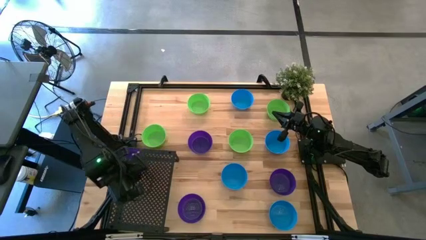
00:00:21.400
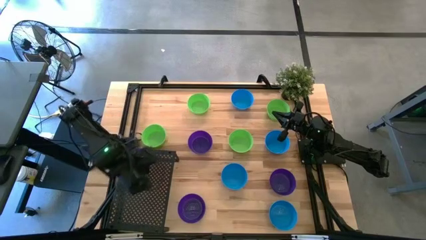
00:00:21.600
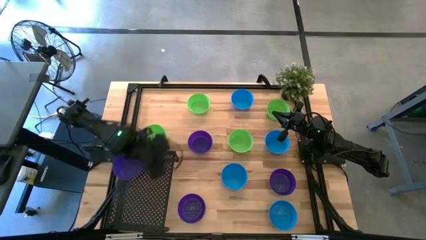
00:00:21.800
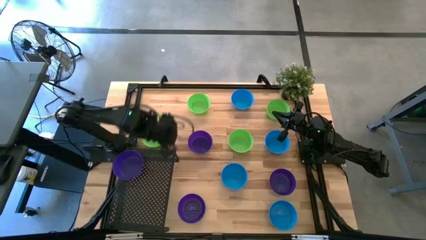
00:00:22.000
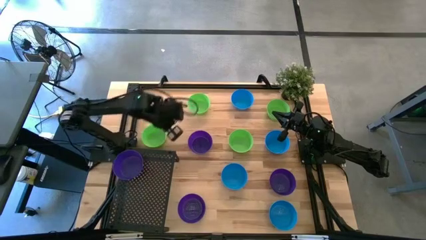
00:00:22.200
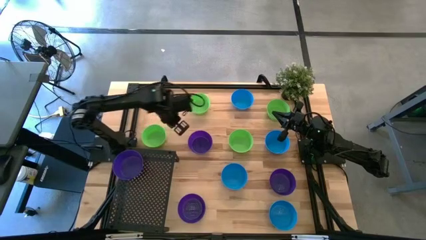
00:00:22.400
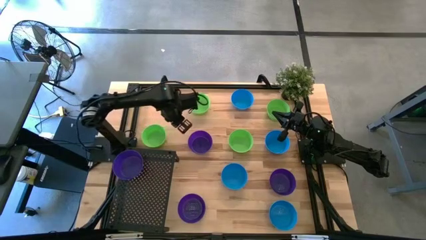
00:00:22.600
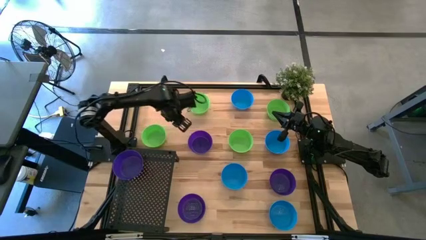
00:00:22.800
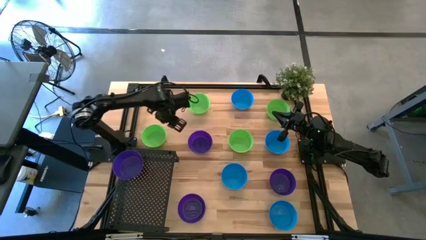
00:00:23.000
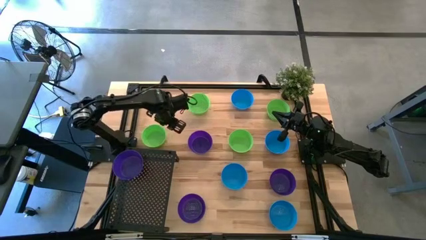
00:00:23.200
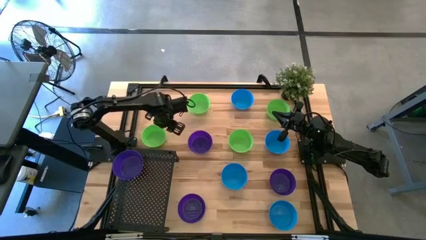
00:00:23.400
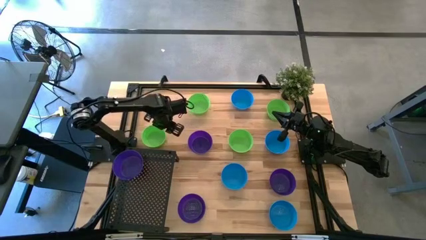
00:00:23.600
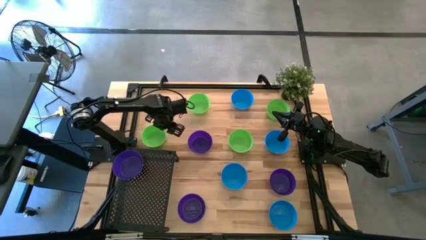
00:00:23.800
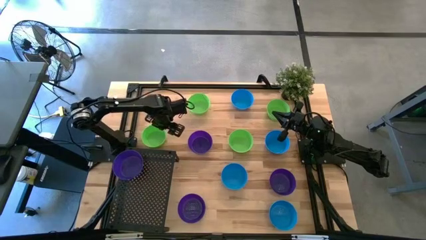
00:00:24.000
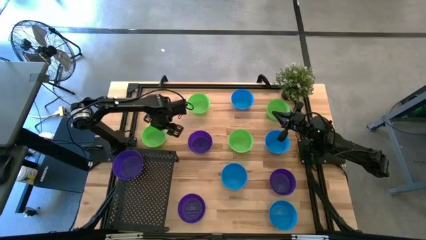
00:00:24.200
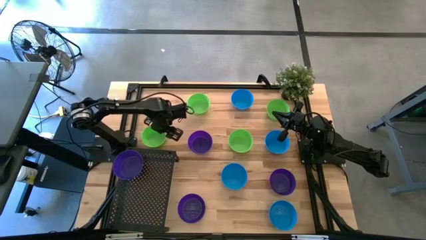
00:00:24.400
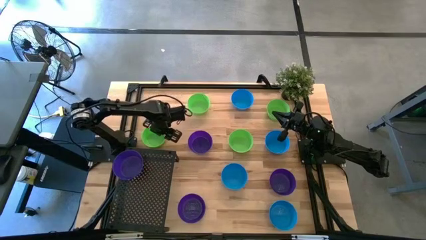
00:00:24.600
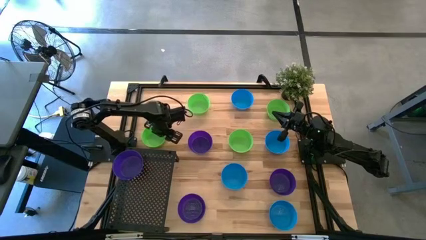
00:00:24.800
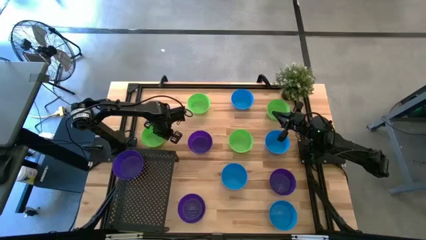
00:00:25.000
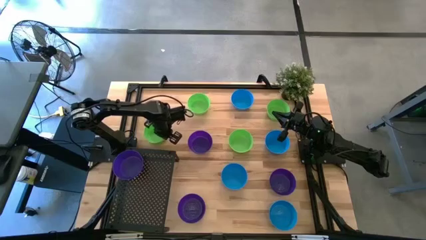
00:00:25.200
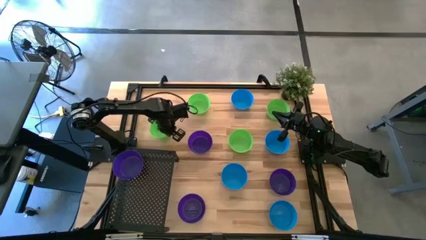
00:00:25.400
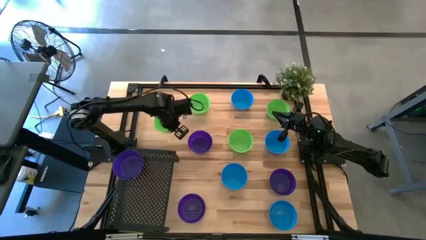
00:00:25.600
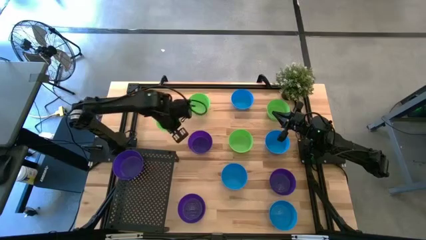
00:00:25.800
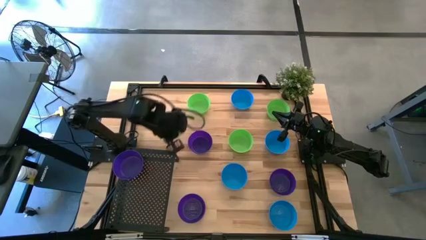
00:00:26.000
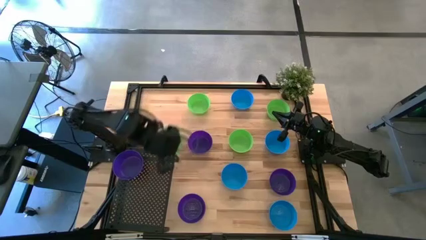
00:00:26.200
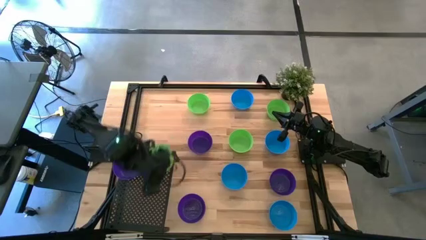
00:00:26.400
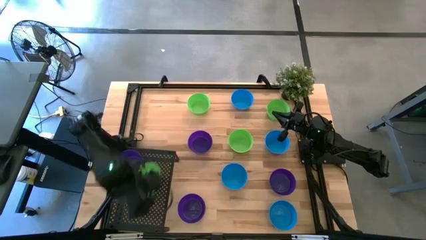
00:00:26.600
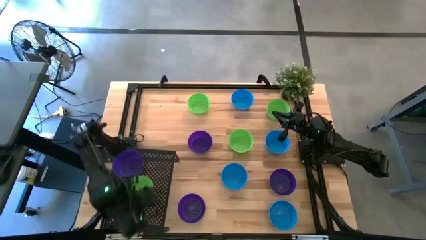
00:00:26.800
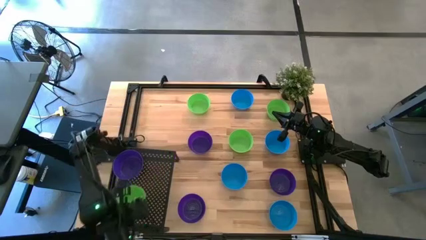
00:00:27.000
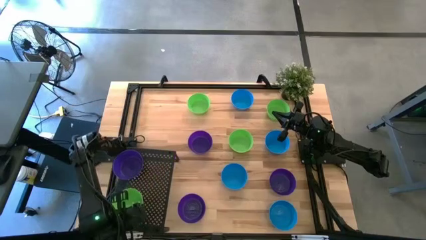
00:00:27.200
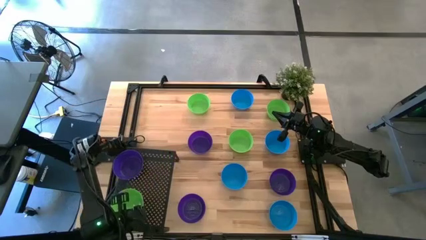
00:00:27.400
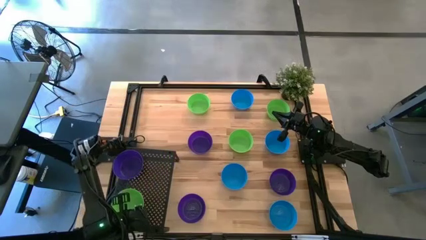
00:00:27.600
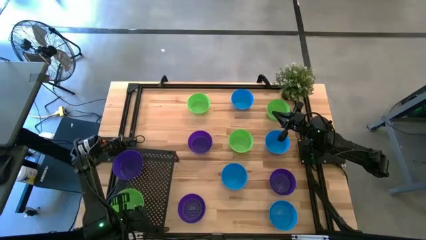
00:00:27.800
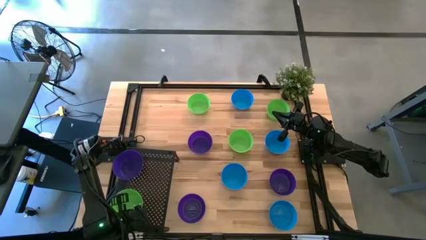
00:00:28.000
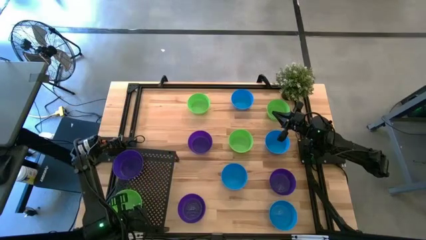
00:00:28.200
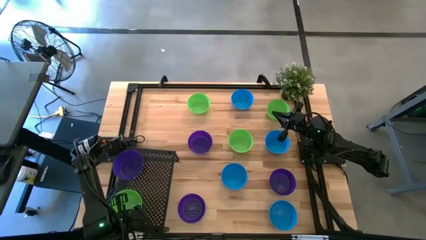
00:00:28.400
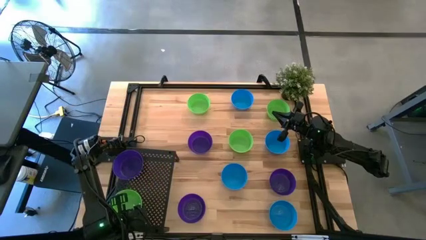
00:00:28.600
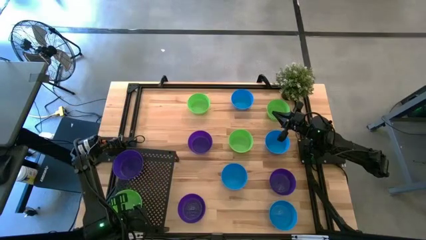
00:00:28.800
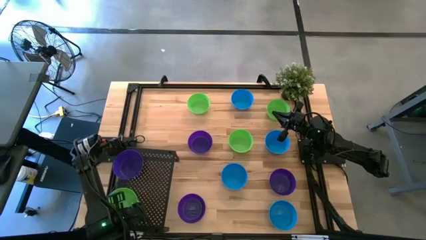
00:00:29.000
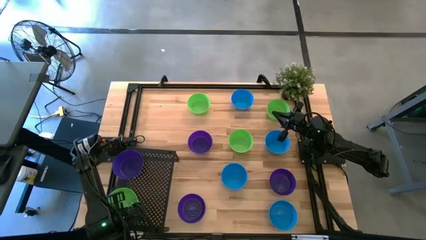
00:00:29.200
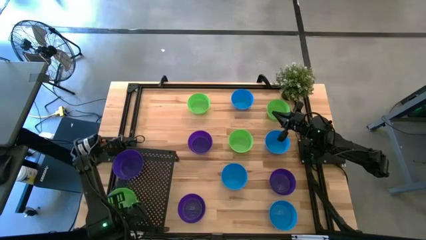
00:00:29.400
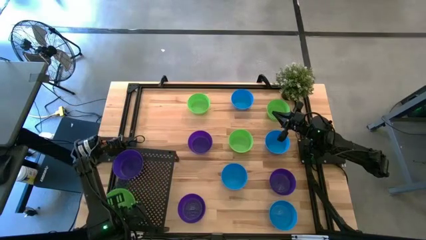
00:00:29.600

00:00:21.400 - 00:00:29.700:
Task: Pick & Place Mini bowls
Put the green bowl on the shelf

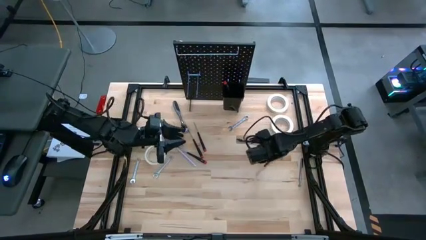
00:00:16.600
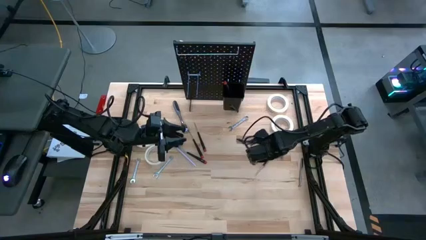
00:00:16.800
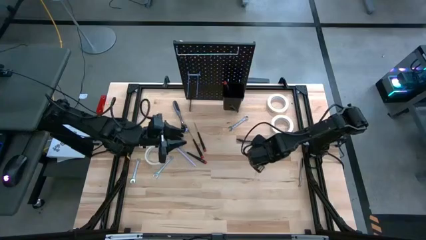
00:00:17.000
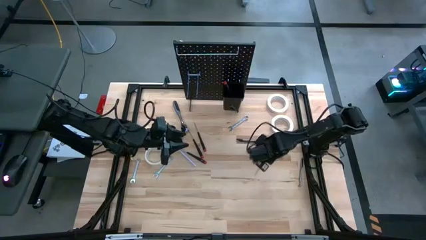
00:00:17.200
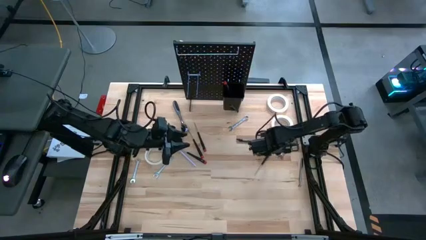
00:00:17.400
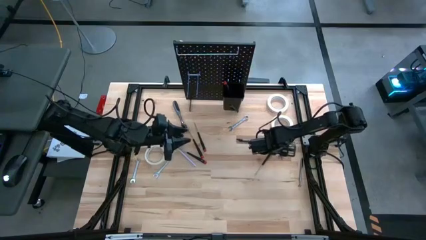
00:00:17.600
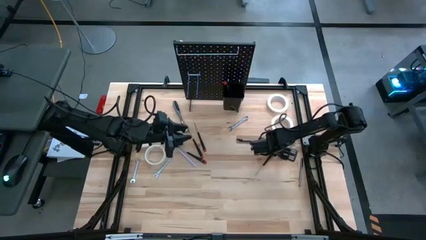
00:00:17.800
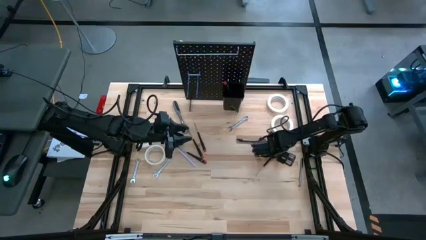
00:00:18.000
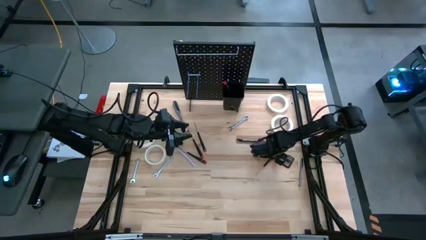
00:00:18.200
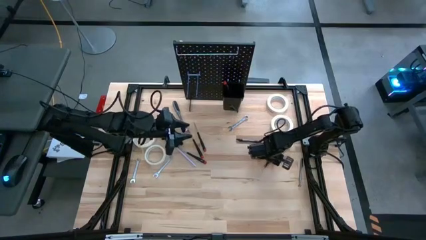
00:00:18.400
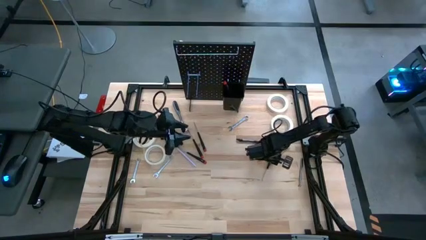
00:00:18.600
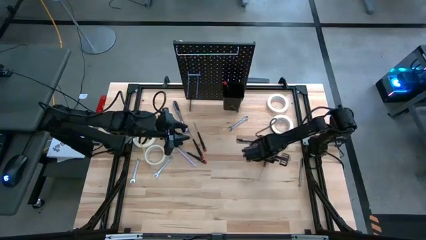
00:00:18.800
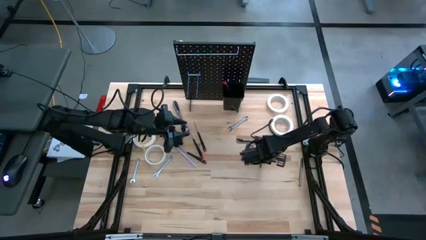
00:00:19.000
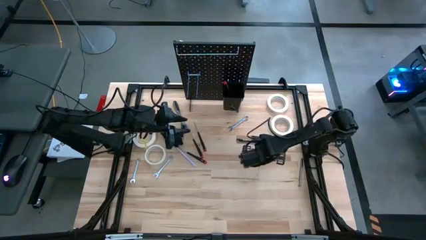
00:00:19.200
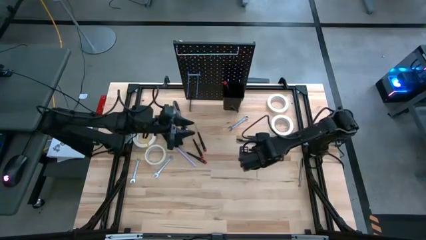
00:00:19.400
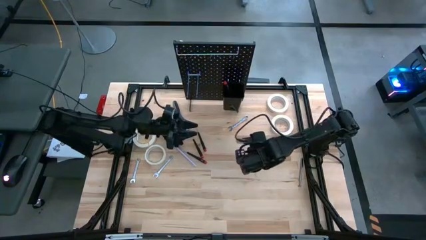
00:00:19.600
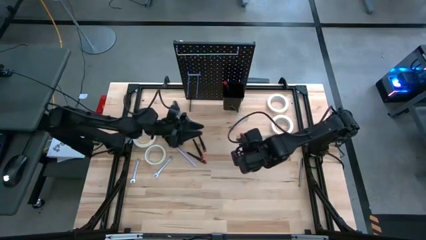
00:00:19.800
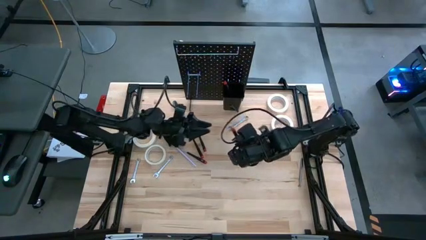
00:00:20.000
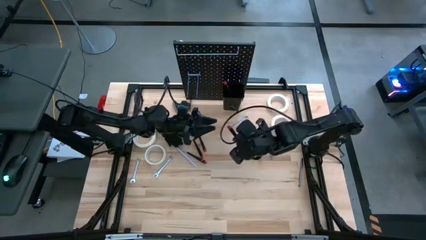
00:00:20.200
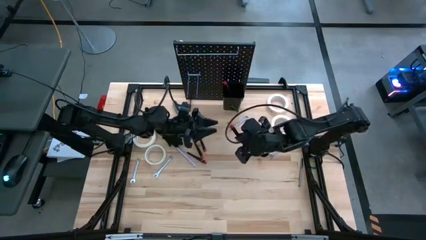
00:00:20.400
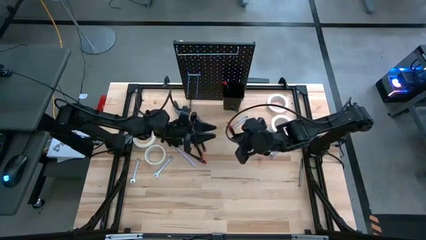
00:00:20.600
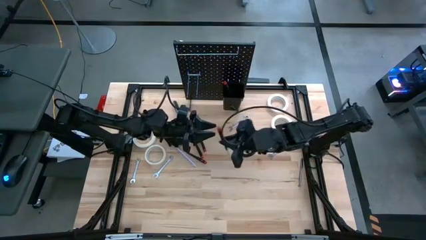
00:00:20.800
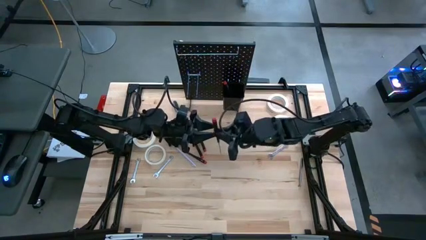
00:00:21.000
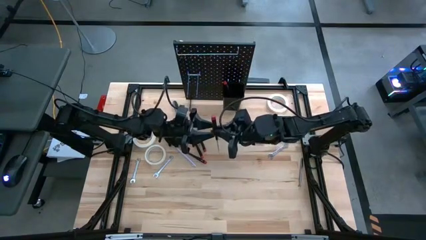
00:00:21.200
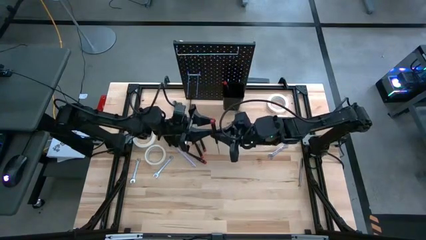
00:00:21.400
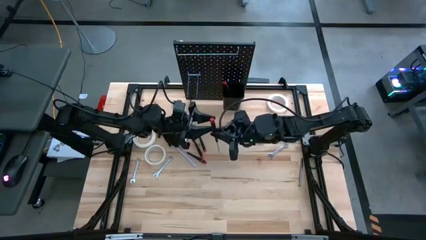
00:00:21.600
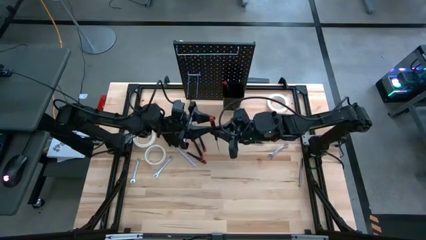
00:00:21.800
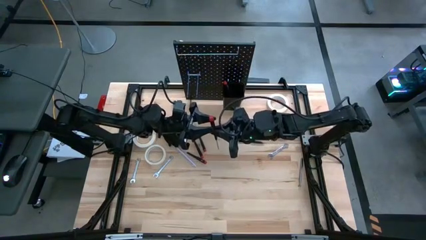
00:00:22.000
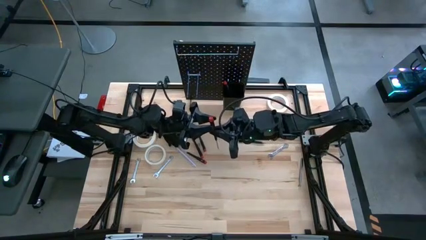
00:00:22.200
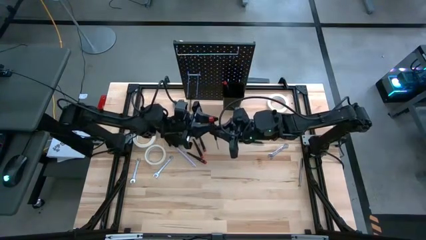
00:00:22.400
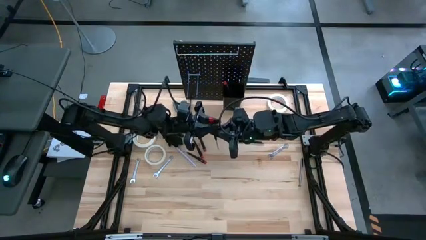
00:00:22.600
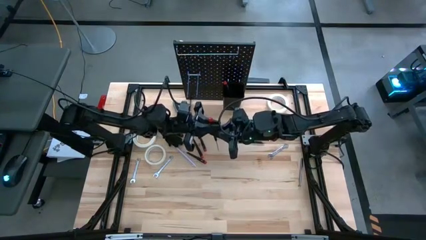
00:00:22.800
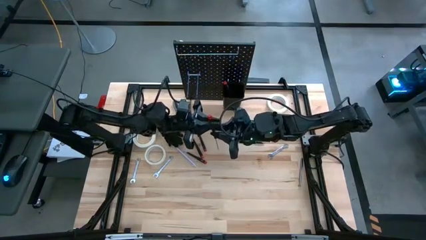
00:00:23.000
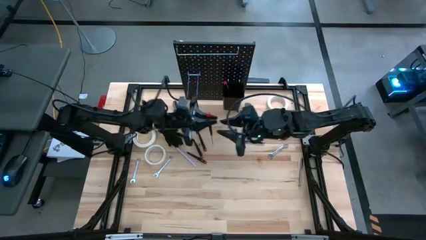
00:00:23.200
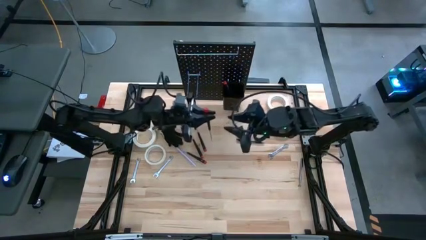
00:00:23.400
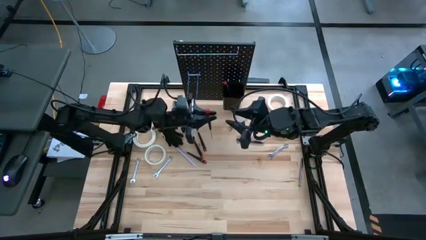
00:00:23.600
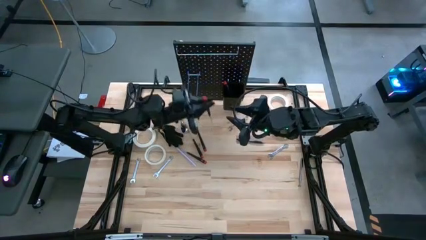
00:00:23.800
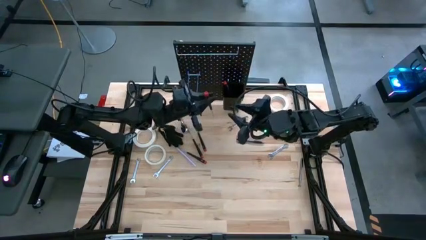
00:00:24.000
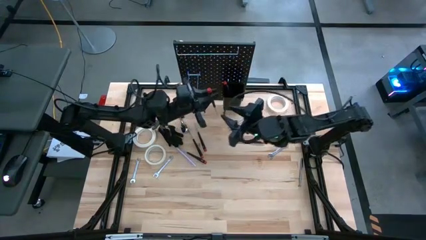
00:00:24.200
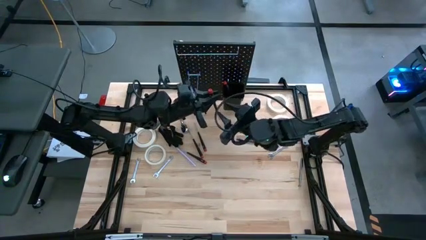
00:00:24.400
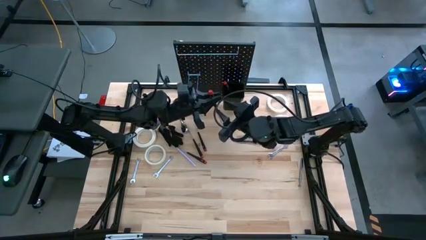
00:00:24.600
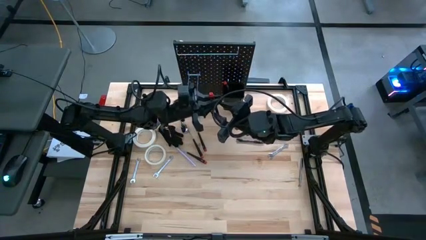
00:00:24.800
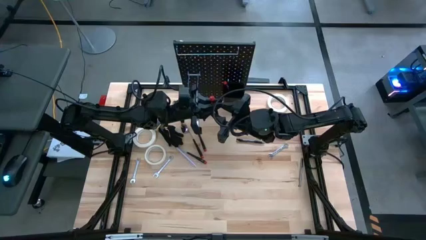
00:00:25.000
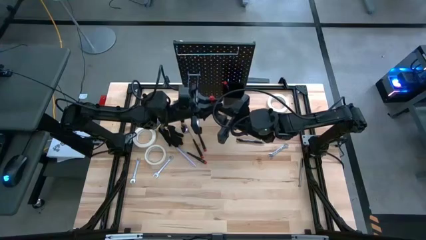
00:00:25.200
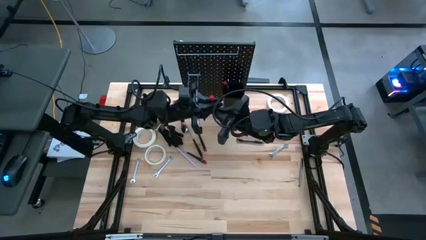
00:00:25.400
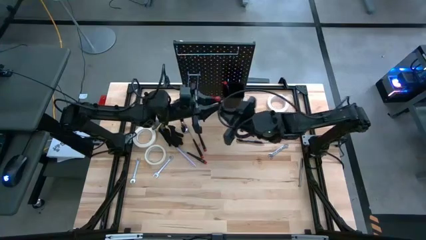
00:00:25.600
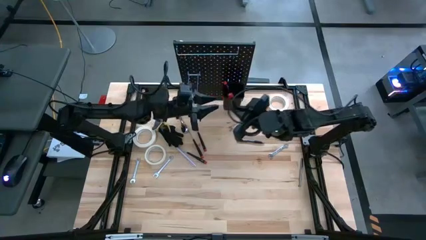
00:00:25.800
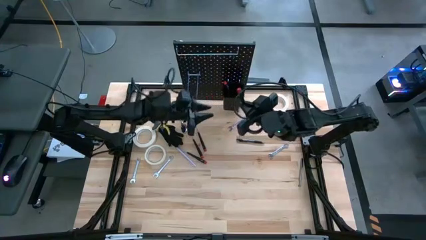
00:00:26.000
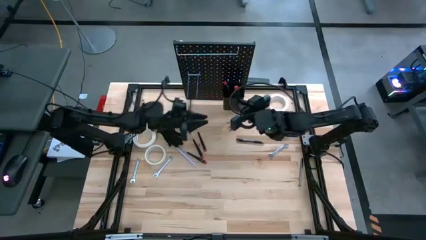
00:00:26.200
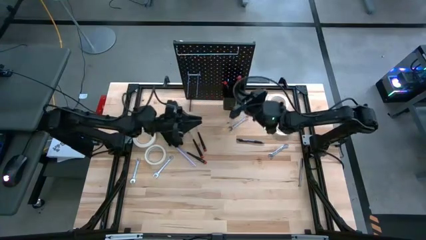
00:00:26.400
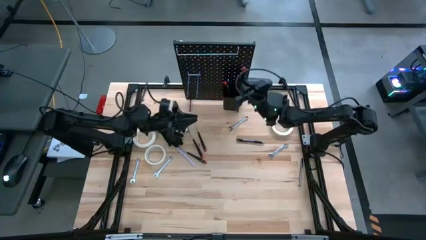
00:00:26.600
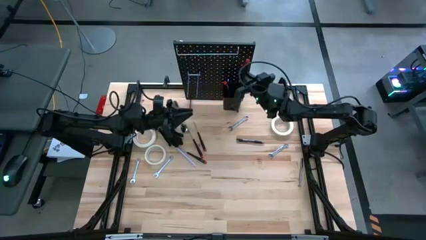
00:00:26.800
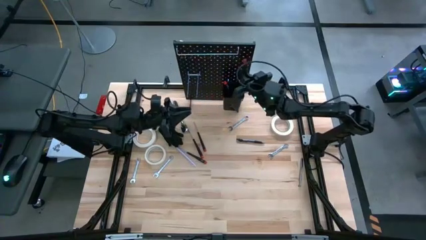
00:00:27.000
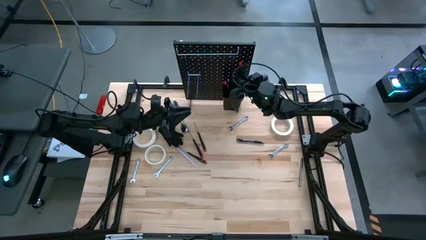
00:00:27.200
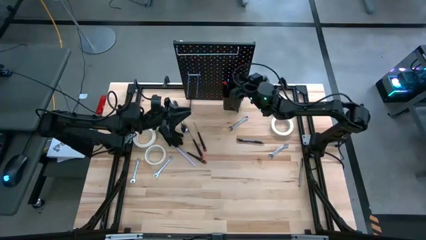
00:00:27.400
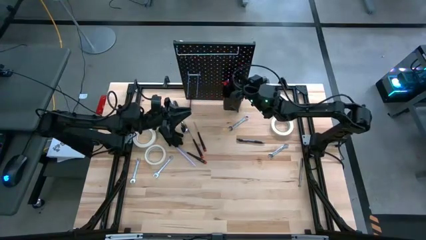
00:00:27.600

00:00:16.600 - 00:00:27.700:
Task: Hang tools onto peg board
Put the nut driver into the black bin on the pegboard
